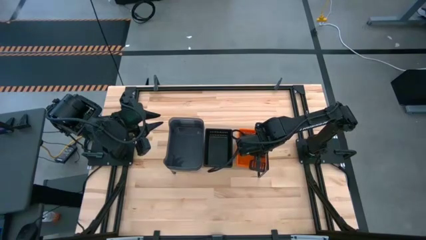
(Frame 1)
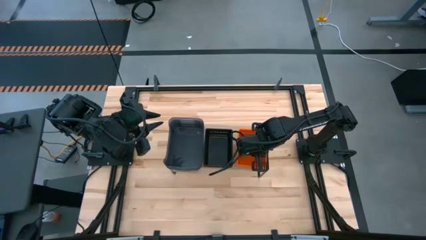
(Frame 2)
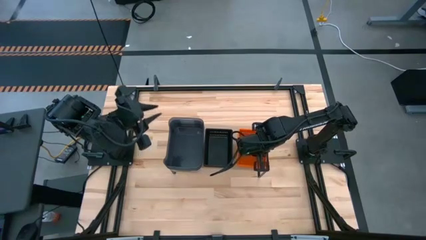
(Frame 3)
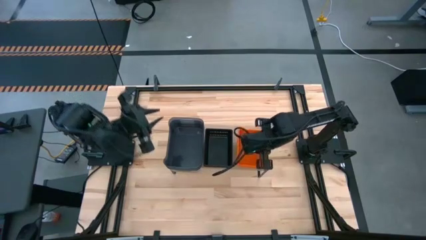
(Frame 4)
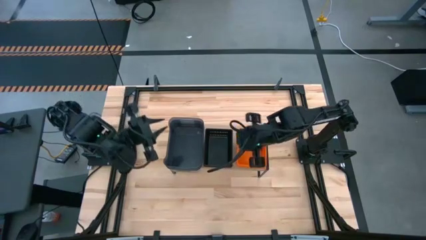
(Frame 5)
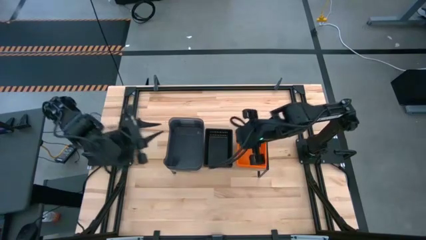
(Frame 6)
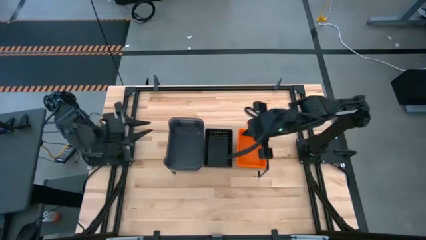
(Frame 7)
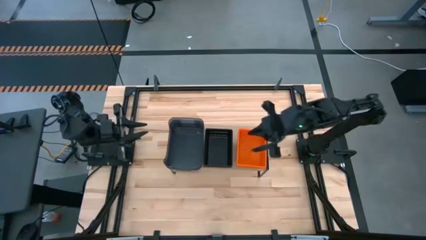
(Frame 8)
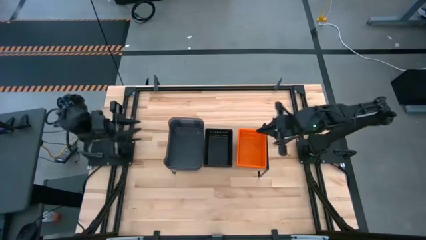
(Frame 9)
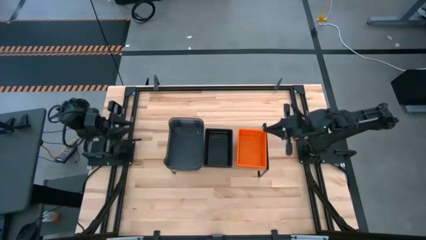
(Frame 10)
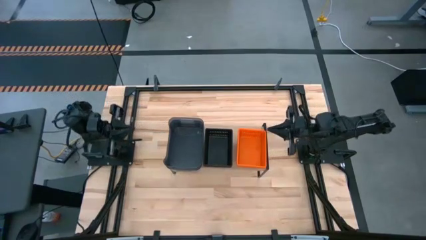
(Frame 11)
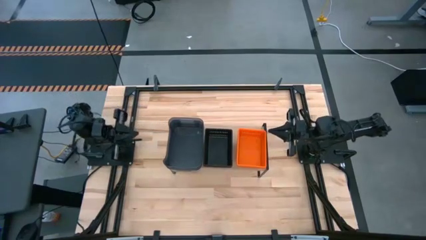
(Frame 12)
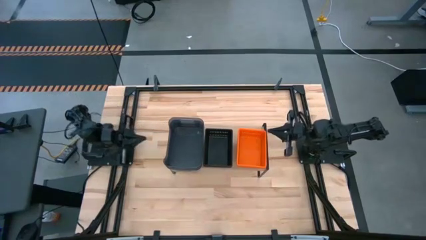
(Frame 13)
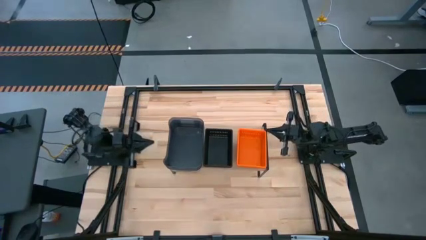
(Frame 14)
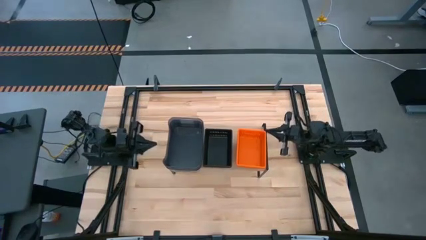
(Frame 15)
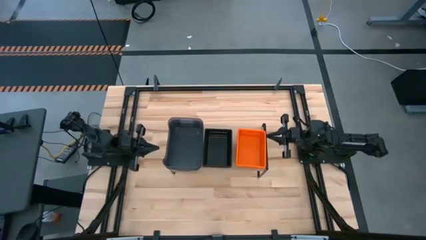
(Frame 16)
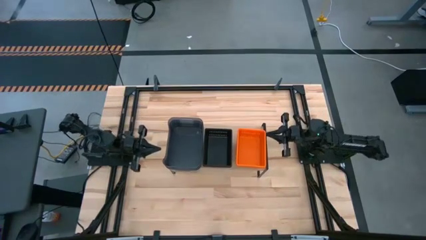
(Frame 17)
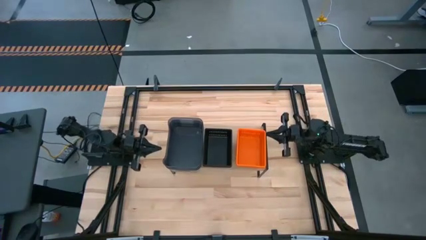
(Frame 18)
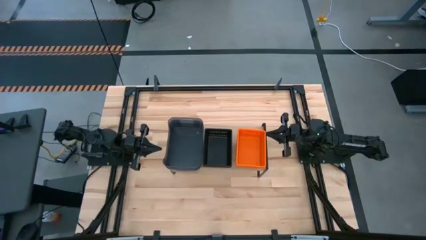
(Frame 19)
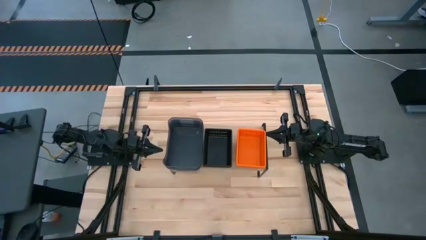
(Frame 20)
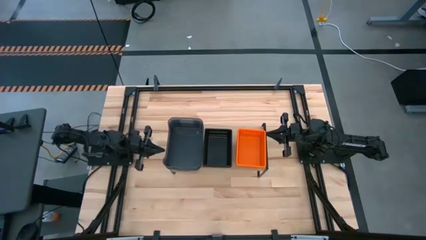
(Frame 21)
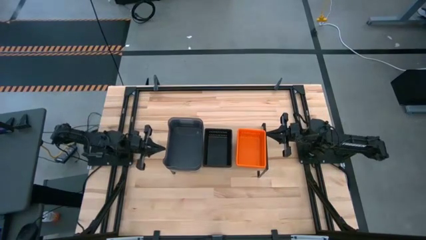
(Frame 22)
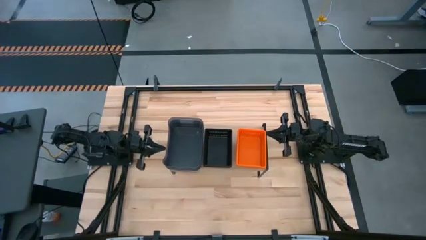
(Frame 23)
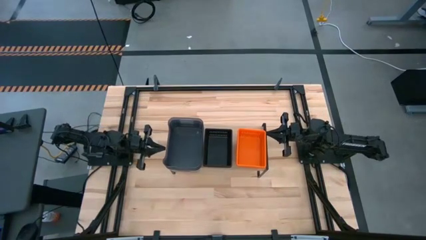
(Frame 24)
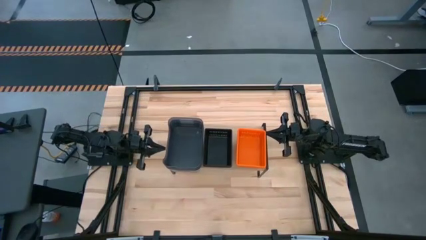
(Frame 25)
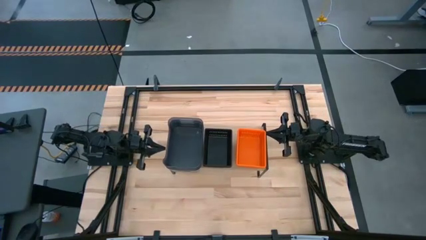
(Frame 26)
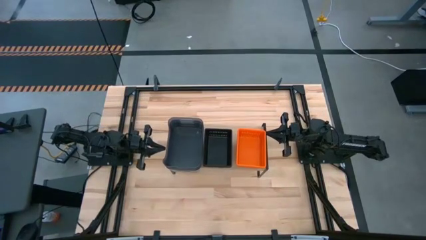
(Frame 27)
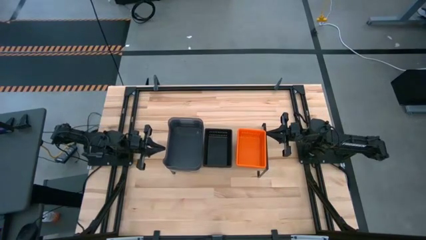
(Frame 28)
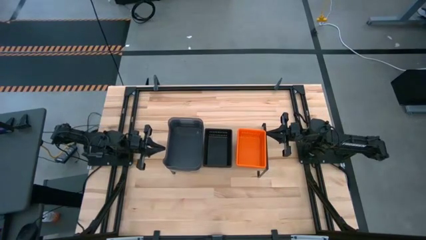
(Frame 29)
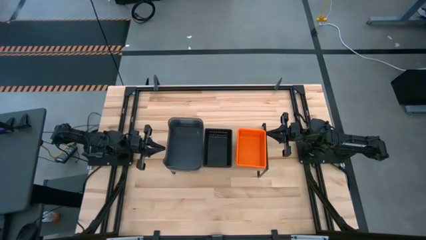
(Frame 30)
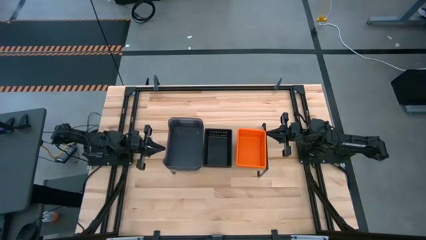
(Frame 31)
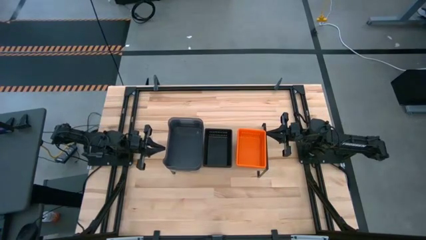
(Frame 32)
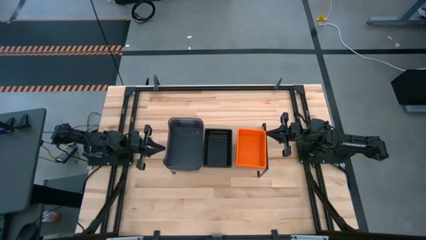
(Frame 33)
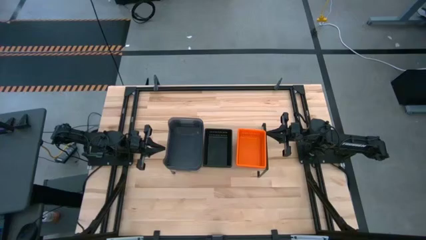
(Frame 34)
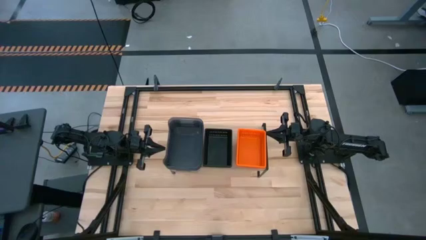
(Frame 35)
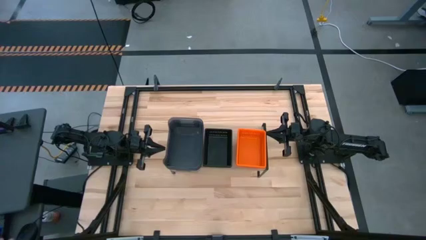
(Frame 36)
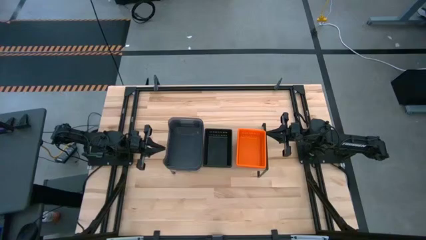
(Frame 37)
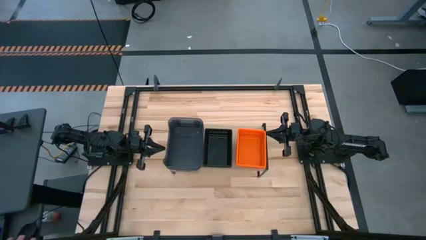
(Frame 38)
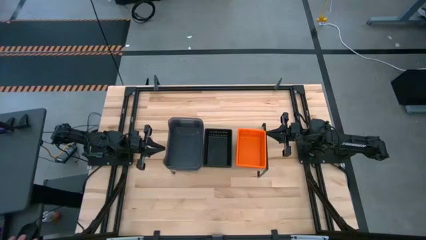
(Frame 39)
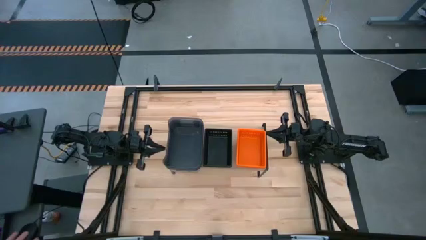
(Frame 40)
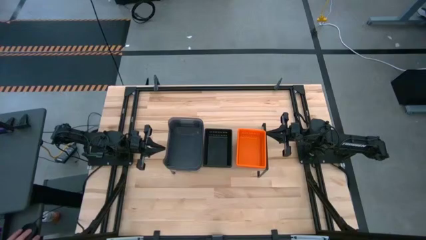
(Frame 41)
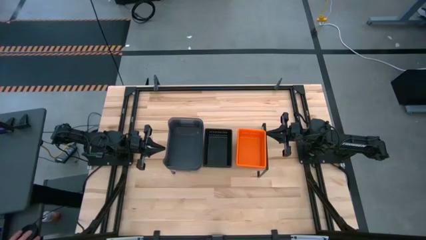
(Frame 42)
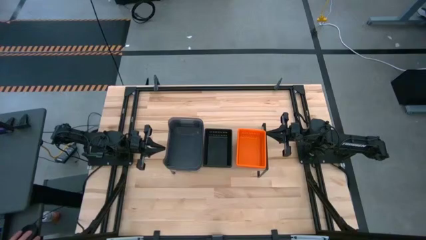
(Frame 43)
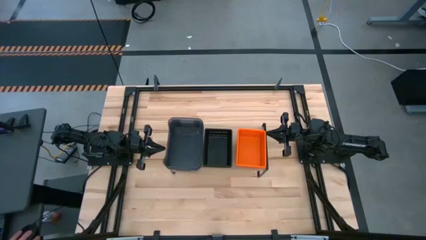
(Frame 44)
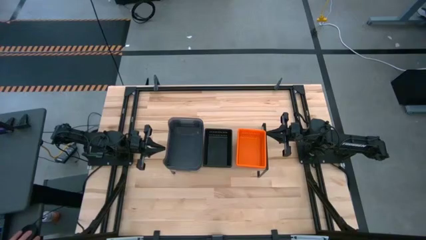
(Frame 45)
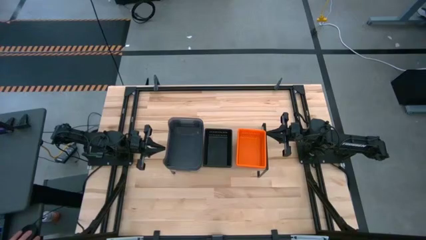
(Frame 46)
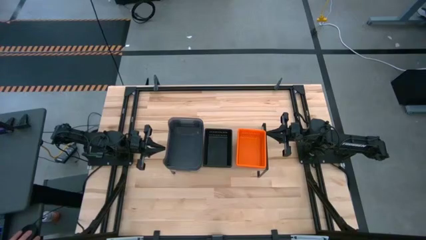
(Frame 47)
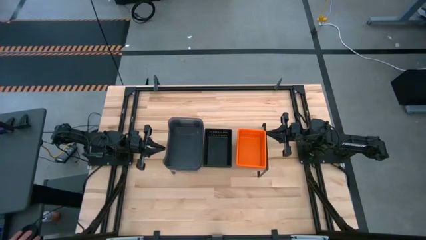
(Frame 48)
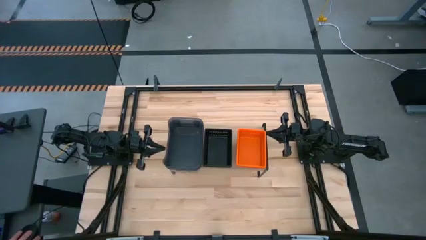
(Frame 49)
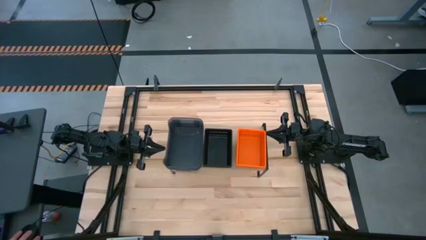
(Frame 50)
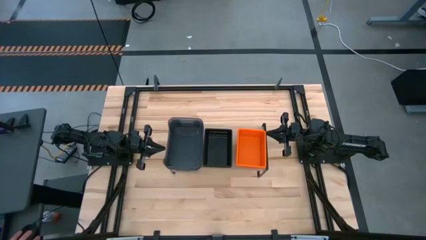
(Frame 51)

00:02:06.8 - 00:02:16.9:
Task: Stack baskets on shelf by color
Return to Home Position

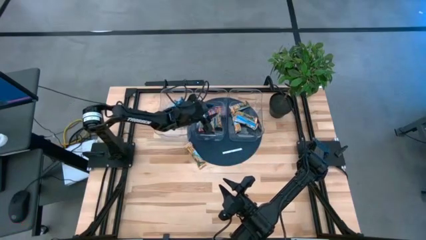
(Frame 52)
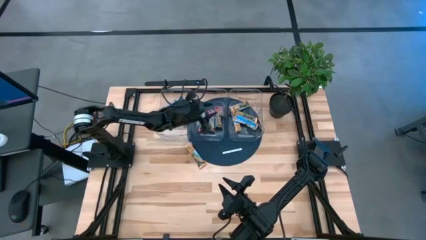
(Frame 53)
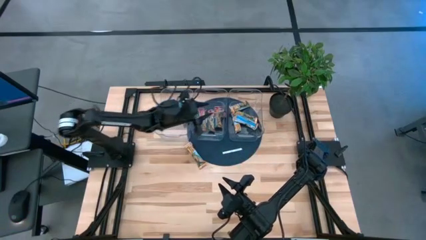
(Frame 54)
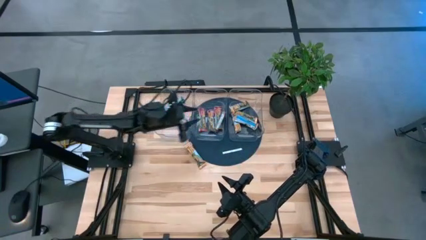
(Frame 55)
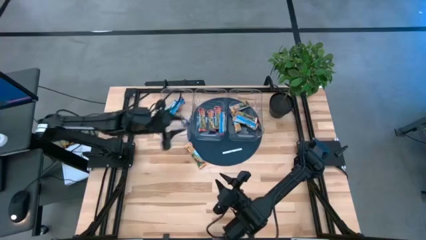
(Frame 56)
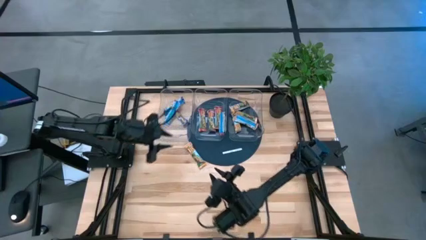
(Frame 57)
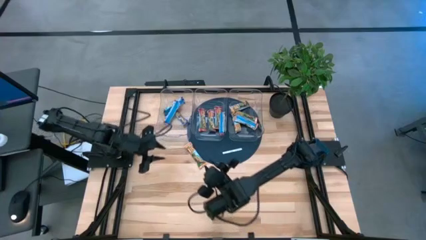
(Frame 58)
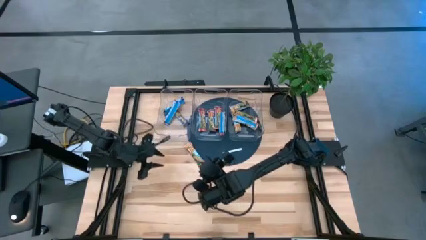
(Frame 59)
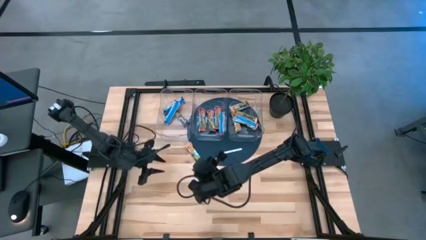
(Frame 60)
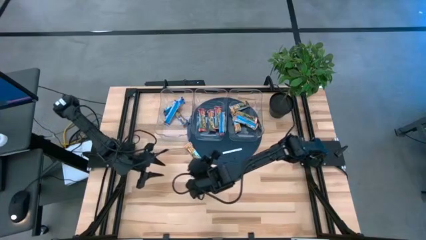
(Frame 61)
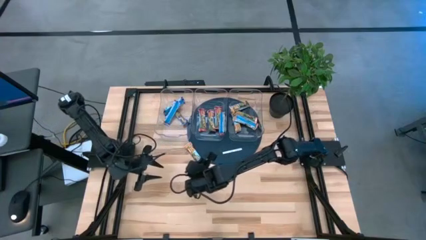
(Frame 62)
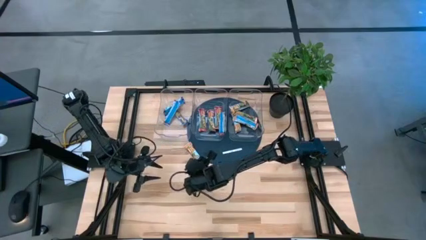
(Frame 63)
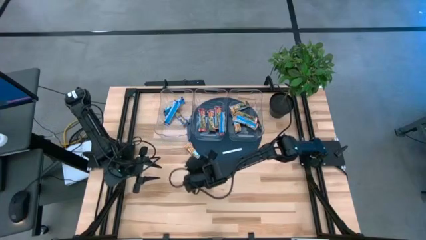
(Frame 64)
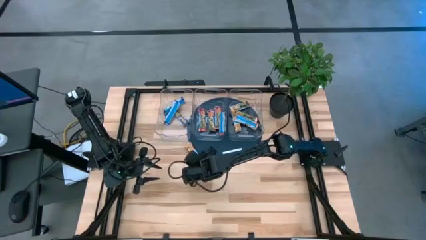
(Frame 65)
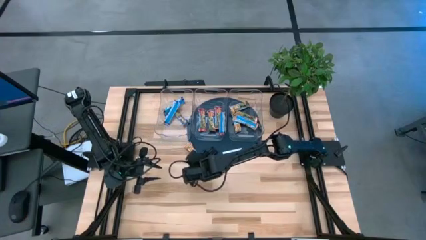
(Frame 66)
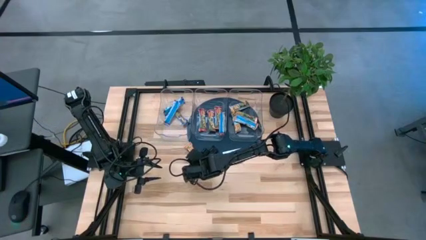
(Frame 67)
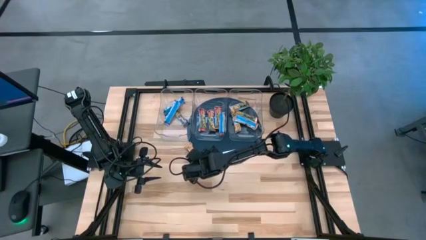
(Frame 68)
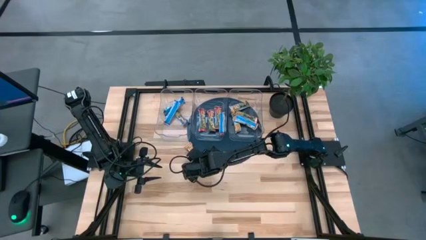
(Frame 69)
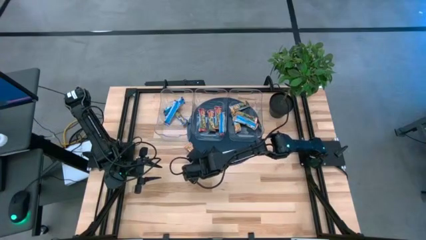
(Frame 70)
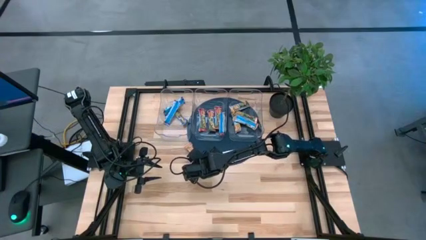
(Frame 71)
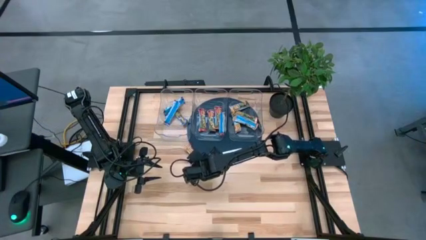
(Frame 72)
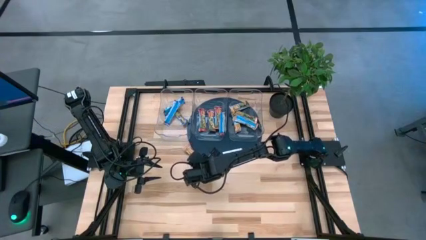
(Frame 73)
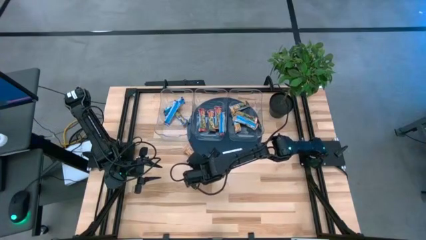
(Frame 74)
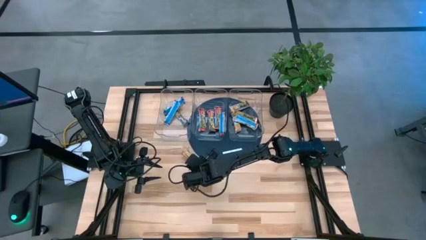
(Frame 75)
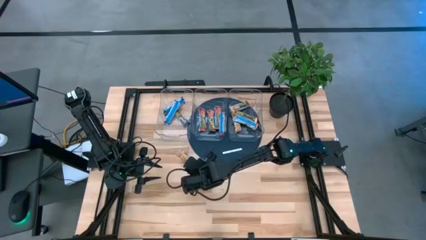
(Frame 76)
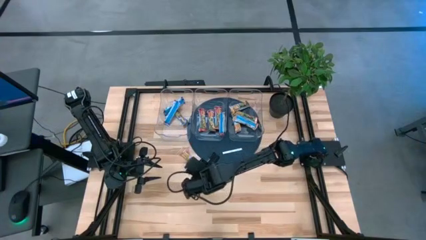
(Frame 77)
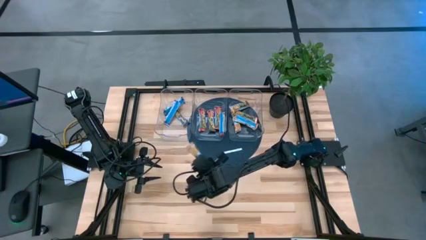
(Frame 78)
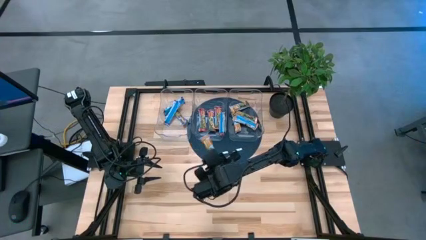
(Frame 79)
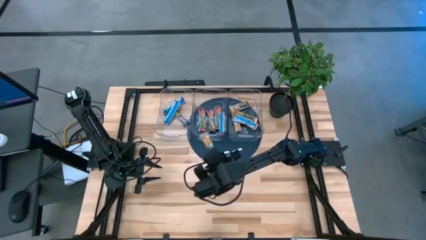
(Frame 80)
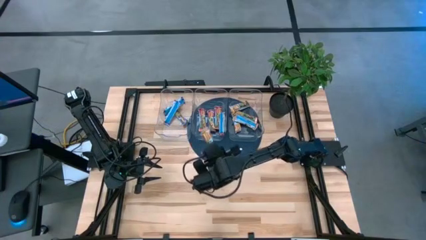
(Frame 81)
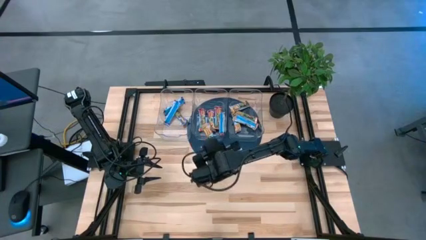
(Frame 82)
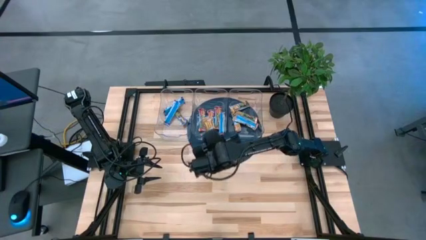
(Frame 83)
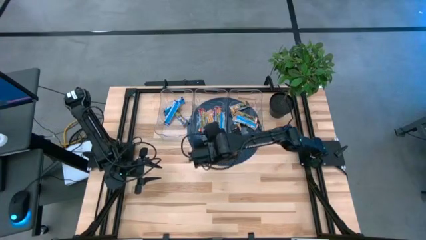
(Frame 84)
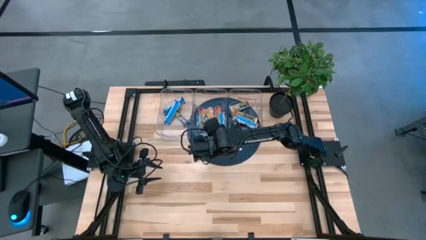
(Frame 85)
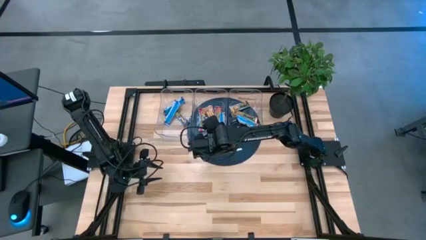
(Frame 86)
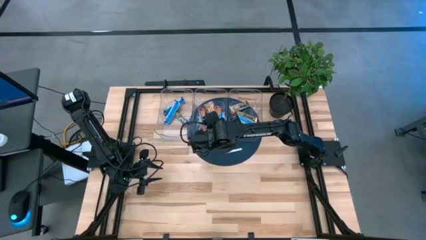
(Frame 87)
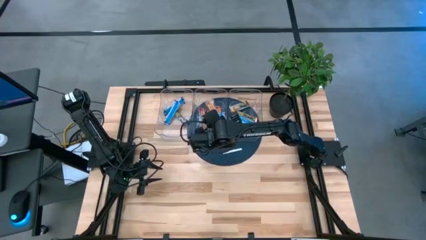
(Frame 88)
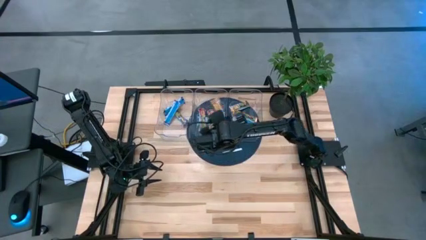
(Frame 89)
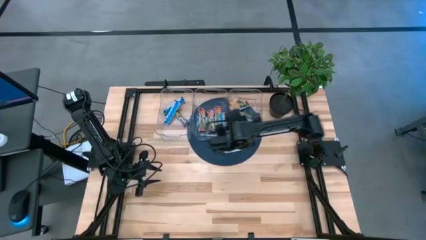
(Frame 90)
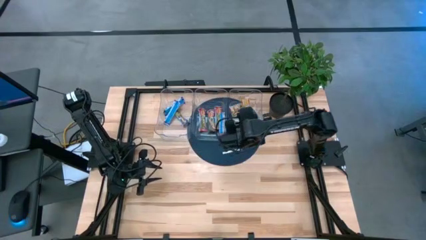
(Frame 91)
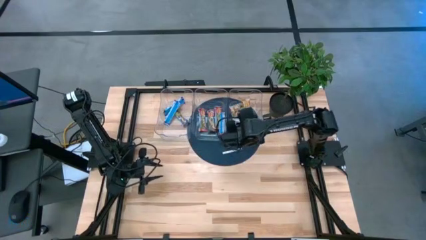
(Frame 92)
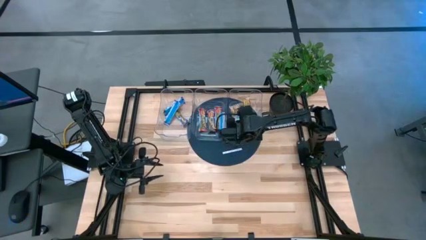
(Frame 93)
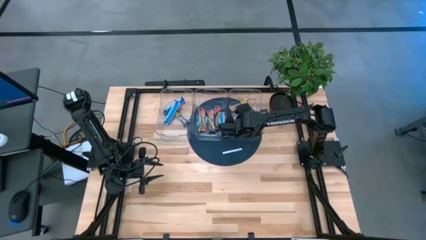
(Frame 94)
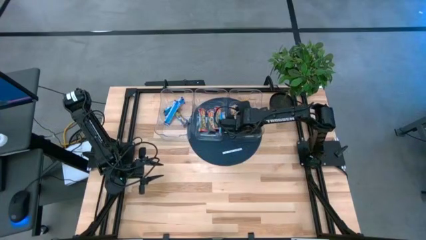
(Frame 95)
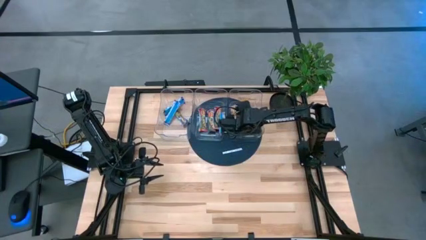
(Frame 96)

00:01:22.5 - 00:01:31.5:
Task: Pick and place Granola Bars by type
Put the orange granola bar into the right transparent bin
